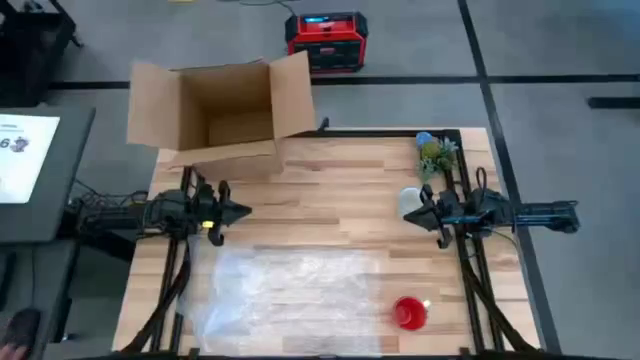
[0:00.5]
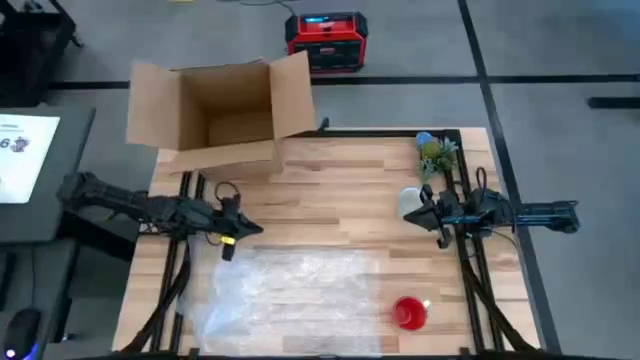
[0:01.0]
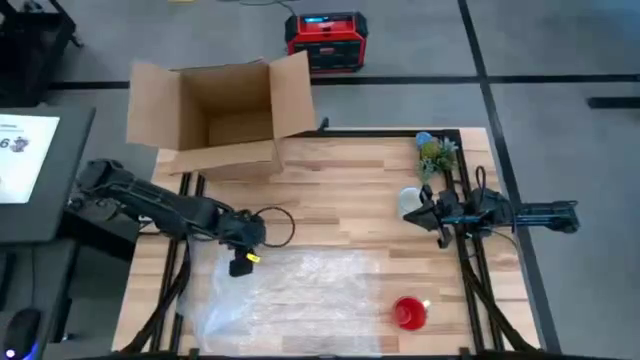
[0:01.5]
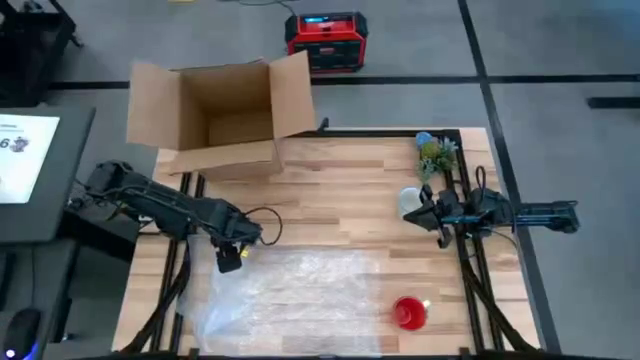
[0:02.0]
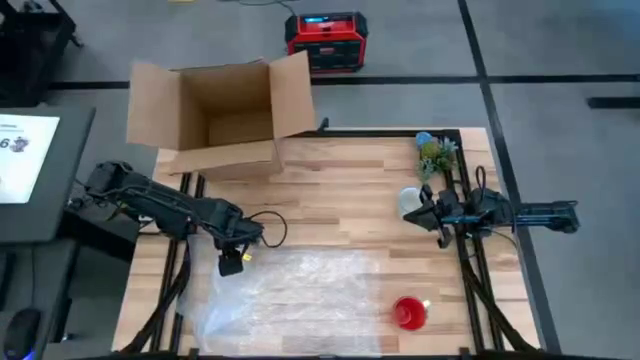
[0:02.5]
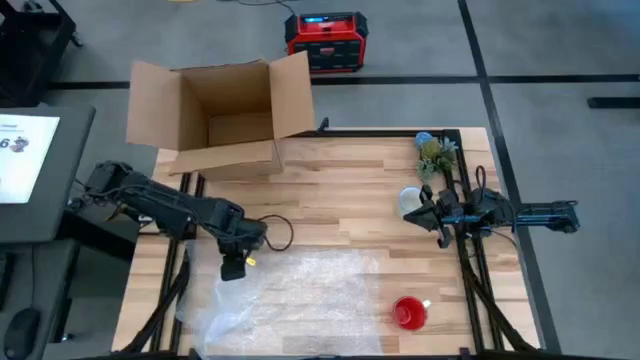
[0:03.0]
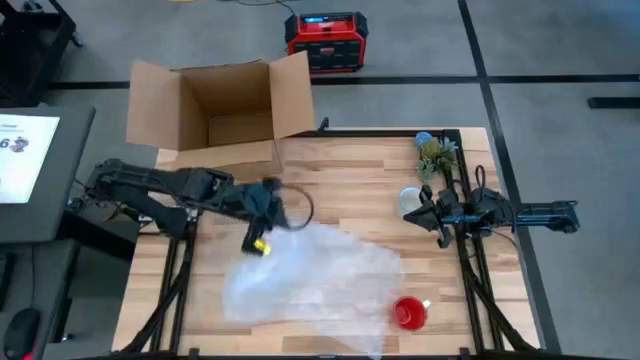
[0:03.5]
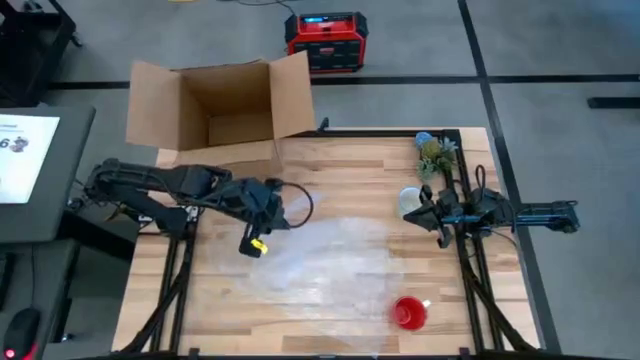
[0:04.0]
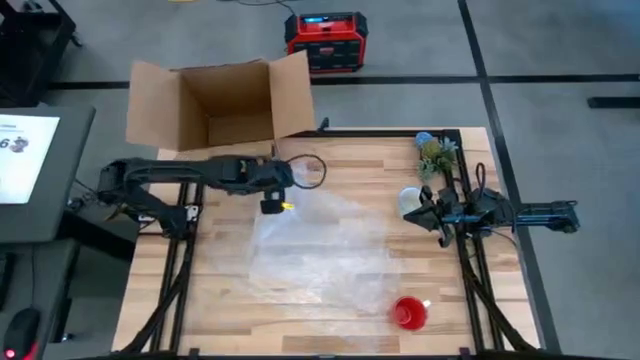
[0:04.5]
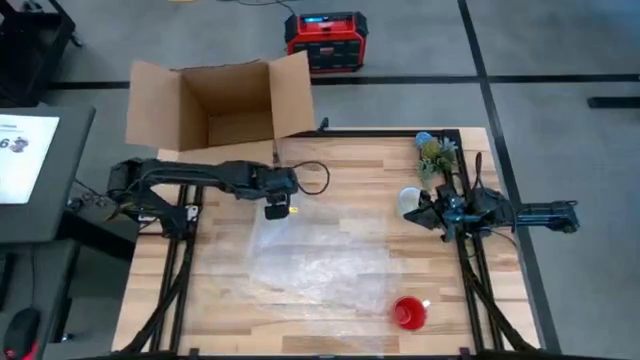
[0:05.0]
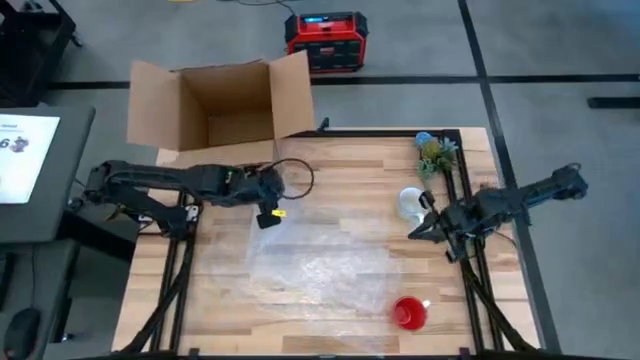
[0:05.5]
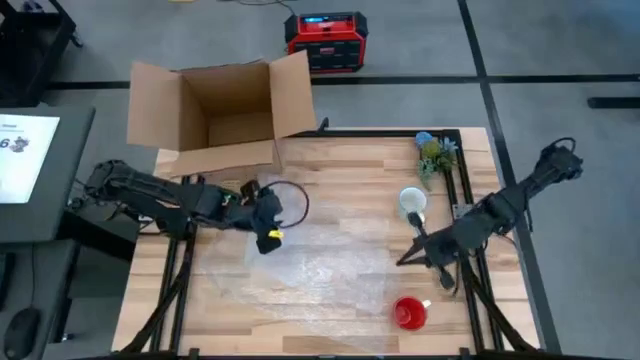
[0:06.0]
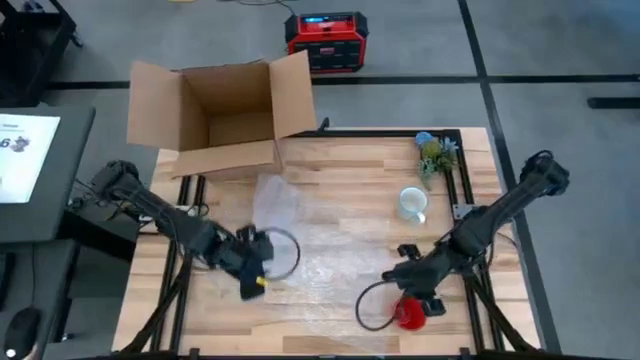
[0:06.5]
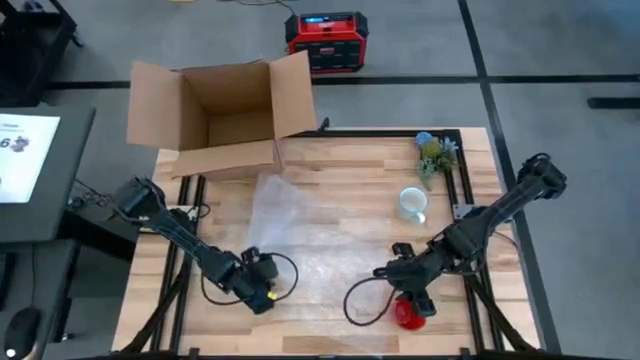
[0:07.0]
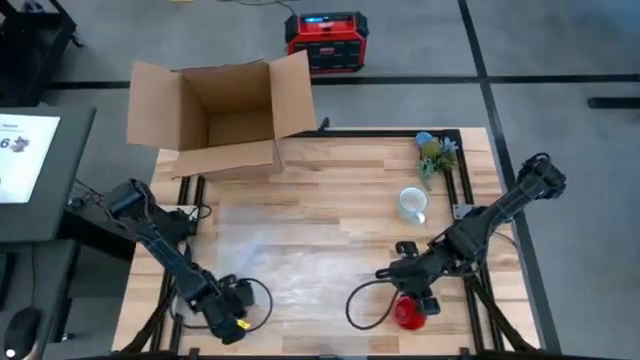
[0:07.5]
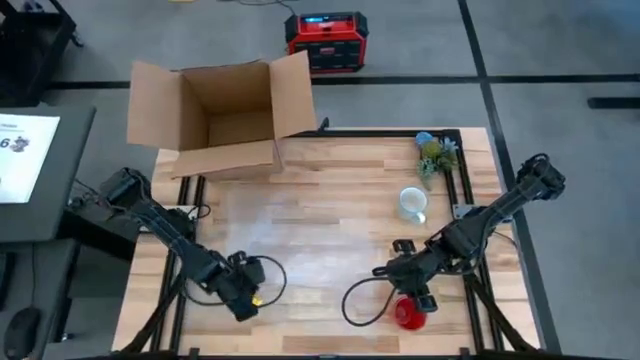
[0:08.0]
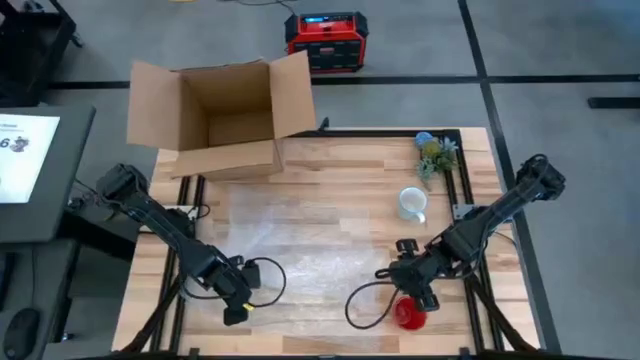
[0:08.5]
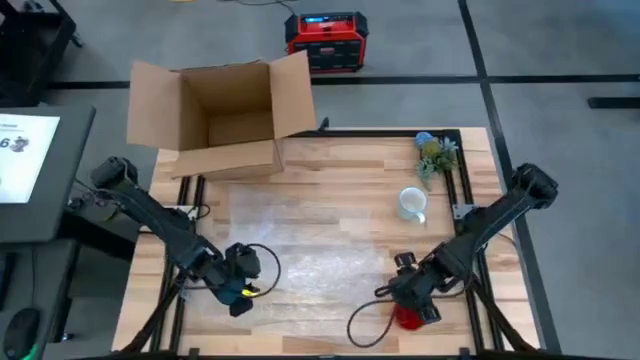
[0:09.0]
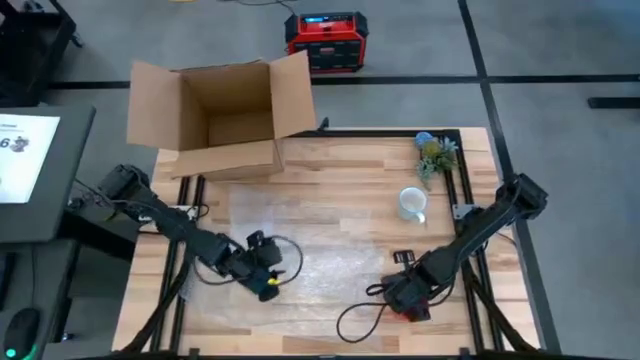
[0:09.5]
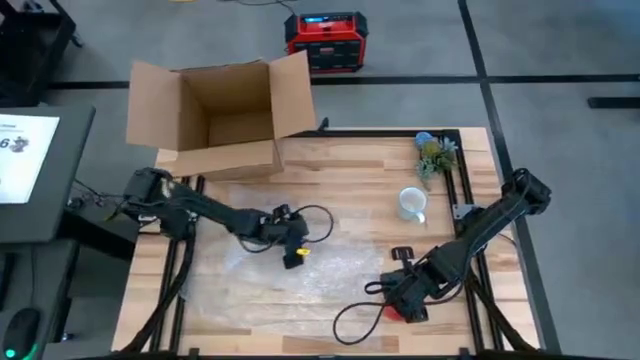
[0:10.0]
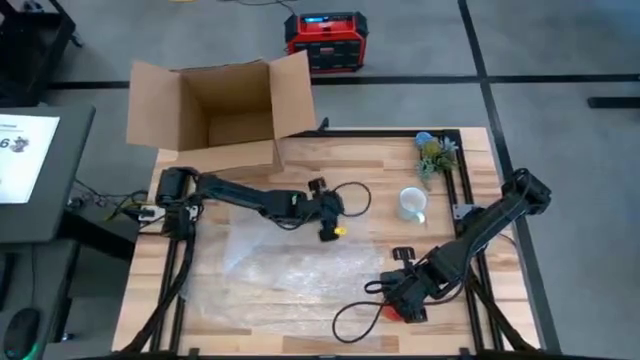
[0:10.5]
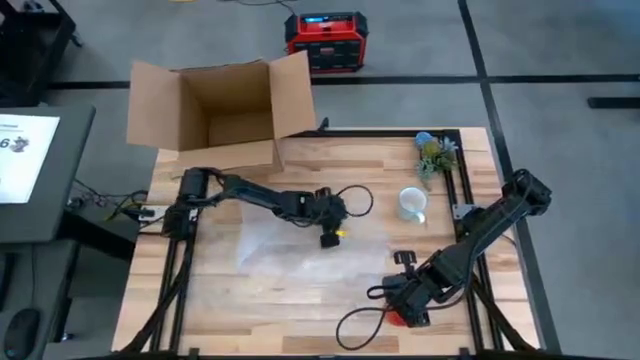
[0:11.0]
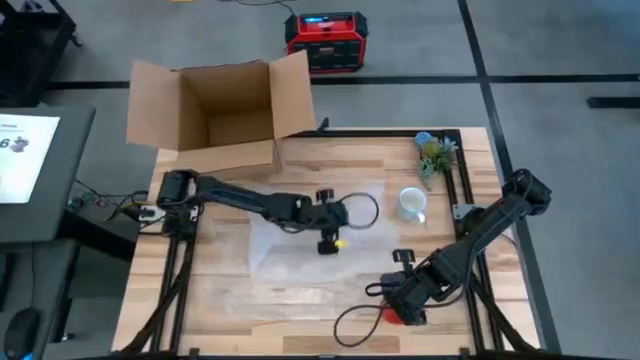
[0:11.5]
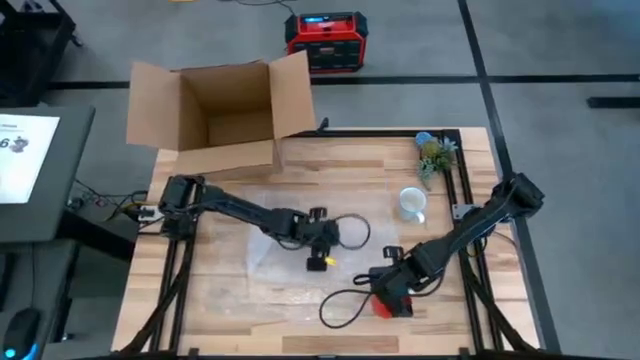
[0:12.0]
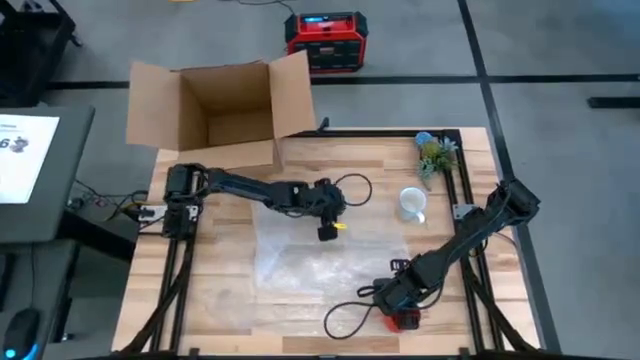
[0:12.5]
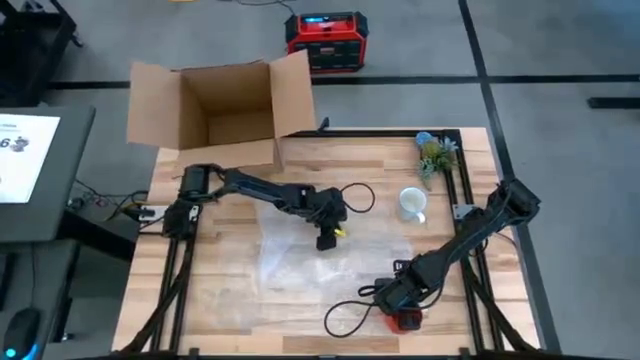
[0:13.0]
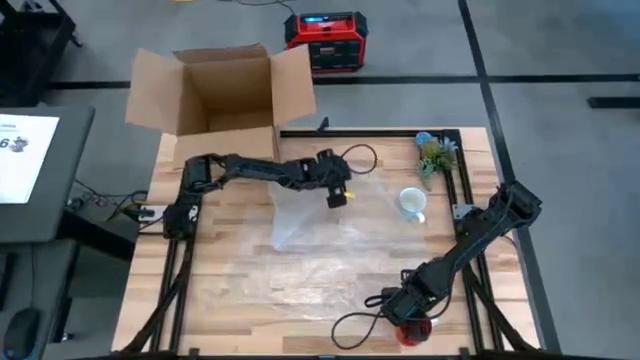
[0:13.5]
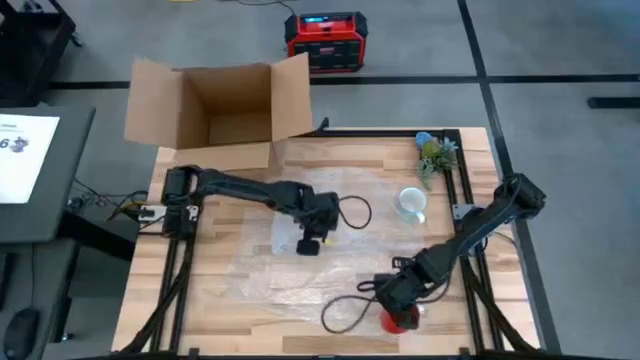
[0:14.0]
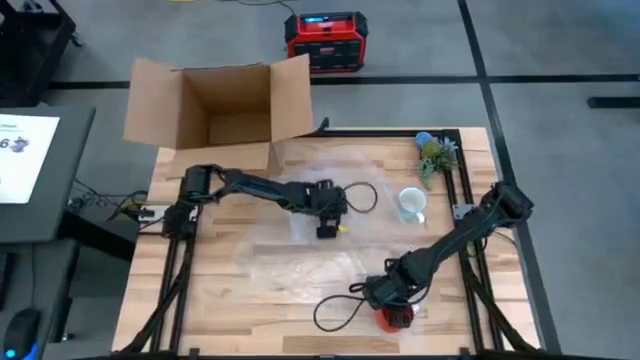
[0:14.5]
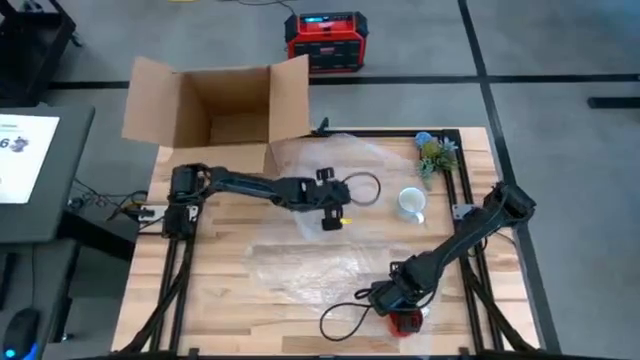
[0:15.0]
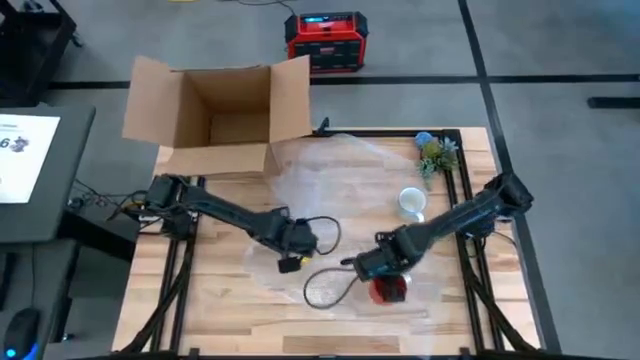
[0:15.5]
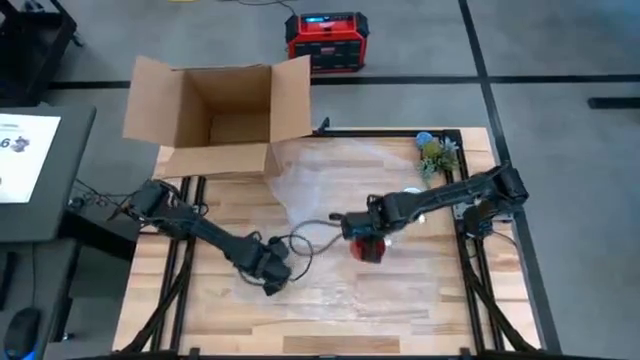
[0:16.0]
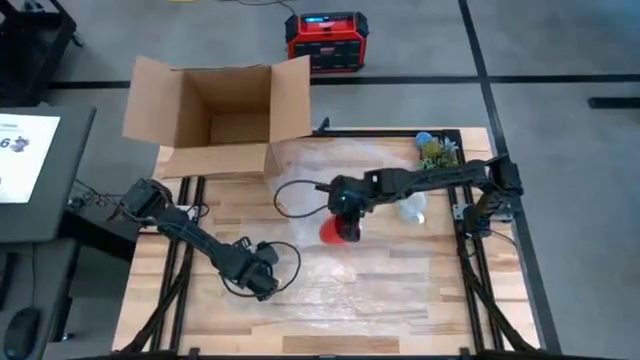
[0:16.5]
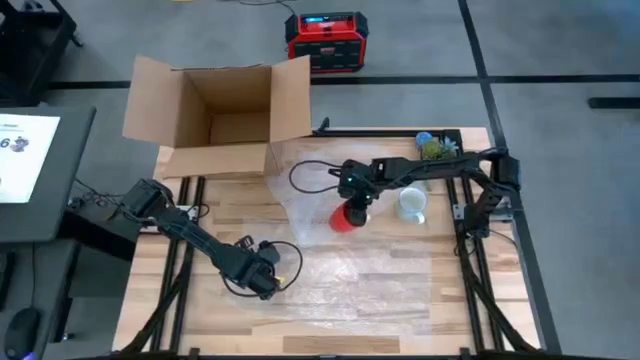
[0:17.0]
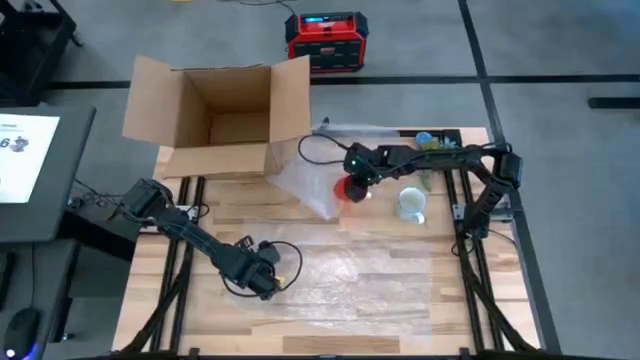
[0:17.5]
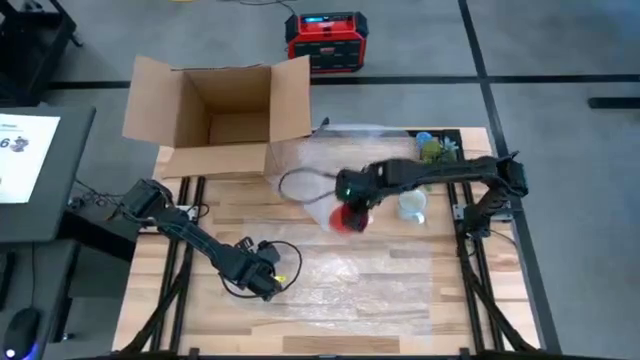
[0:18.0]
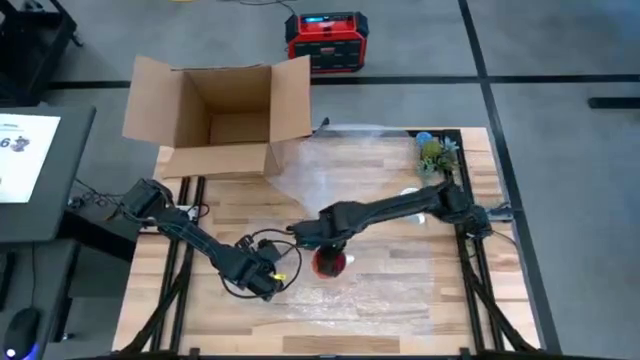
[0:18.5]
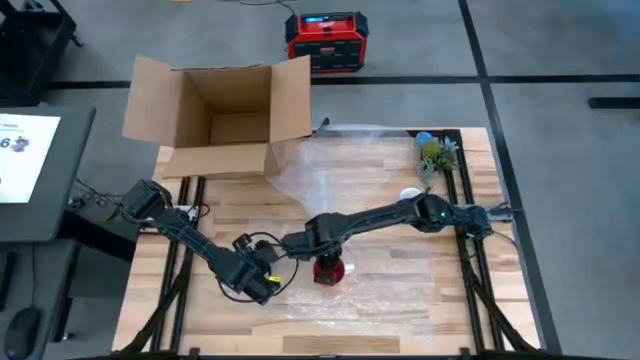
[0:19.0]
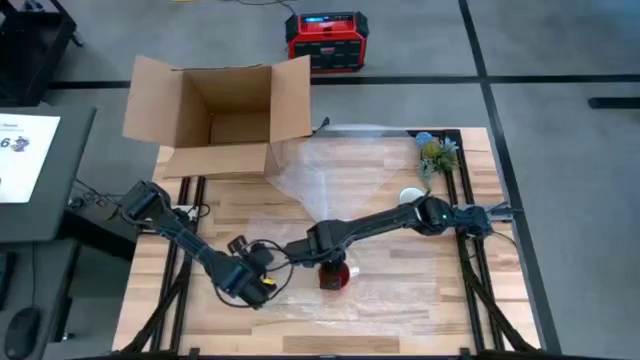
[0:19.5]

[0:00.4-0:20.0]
Task: wrap mug
Wrap the red mug with bubble wrap
